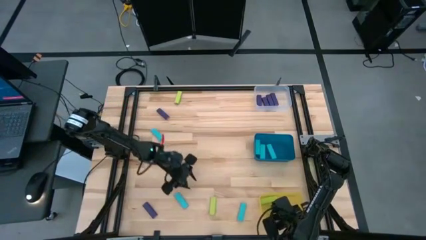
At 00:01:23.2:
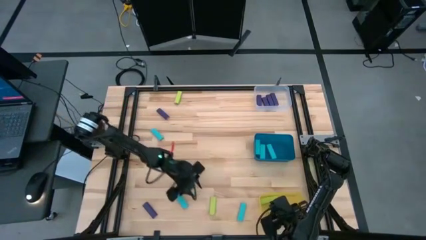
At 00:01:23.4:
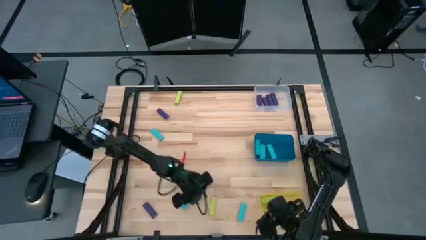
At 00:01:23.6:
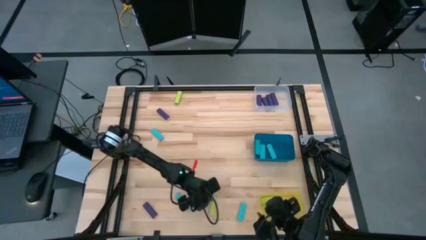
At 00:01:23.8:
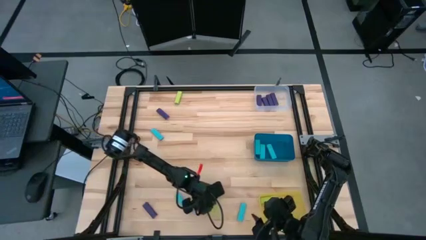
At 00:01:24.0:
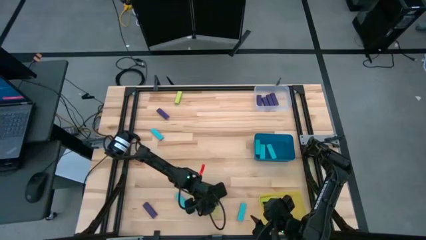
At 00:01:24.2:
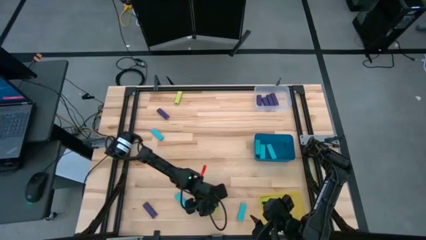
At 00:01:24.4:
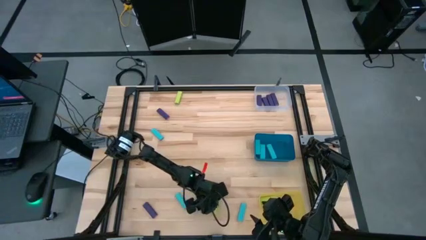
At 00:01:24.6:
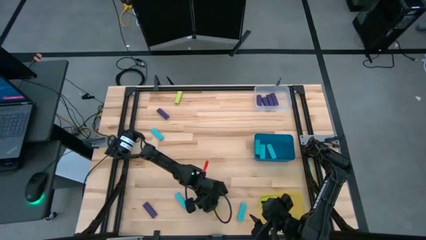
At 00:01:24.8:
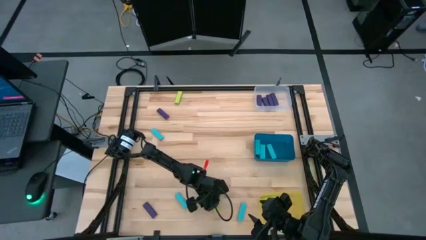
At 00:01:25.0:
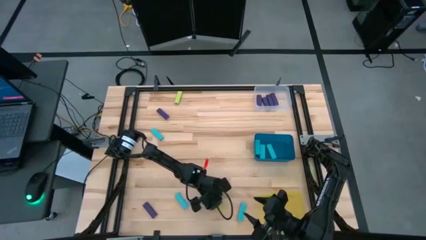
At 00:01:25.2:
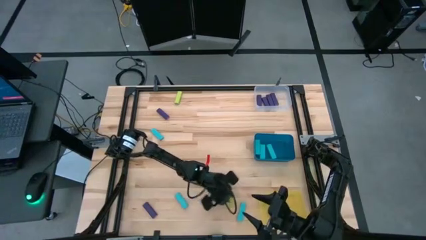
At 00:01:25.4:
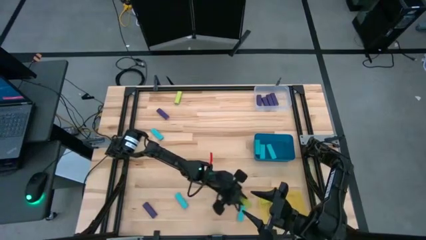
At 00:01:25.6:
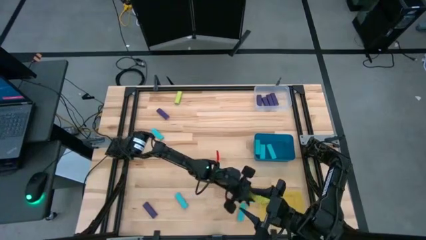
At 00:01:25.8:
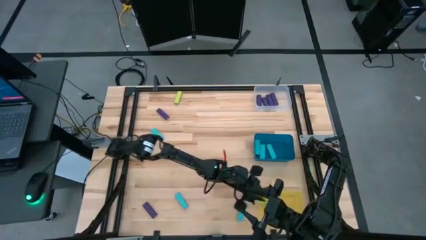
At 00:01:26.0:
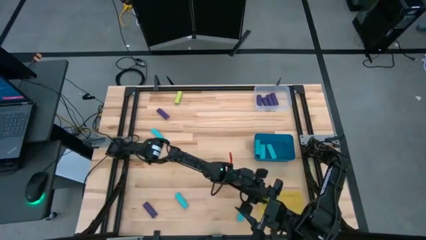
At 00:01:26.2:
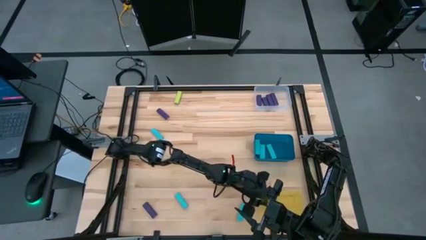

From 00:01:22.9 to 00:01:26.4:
Task: Sort blocks
Put the light green block into the yellow bin

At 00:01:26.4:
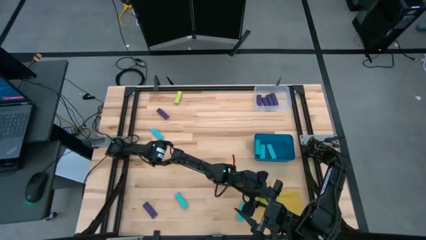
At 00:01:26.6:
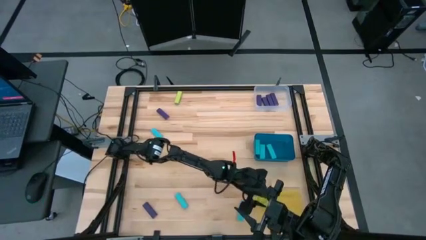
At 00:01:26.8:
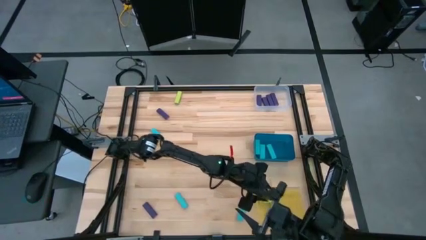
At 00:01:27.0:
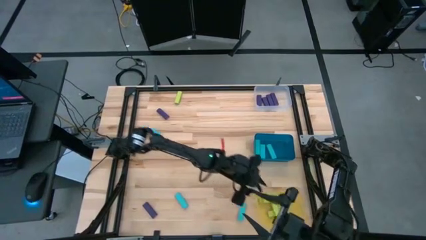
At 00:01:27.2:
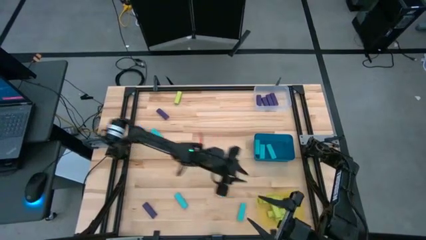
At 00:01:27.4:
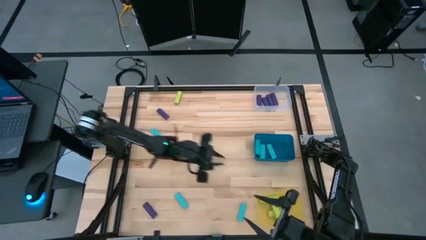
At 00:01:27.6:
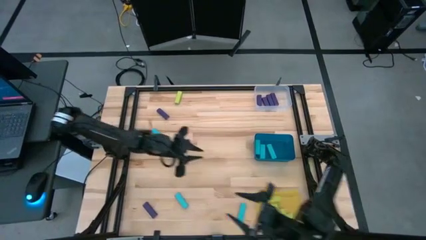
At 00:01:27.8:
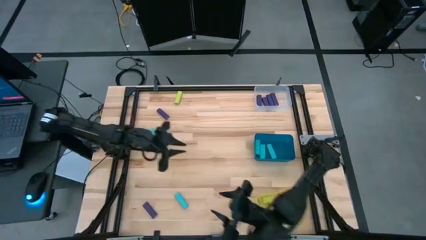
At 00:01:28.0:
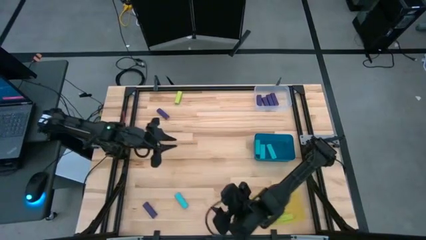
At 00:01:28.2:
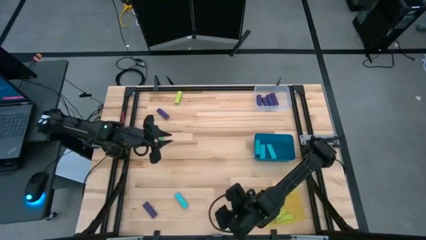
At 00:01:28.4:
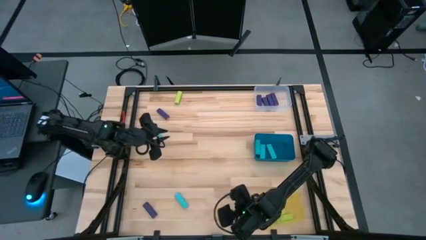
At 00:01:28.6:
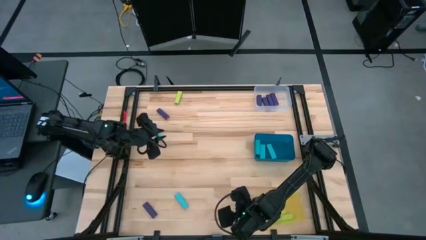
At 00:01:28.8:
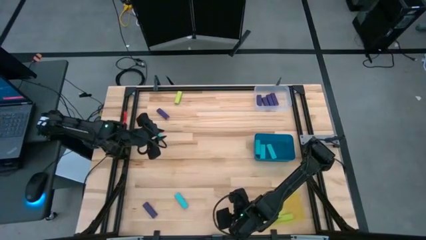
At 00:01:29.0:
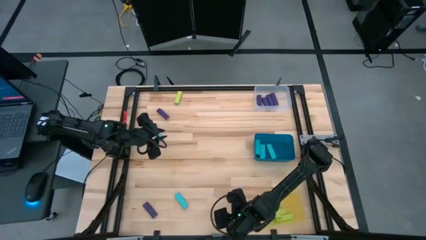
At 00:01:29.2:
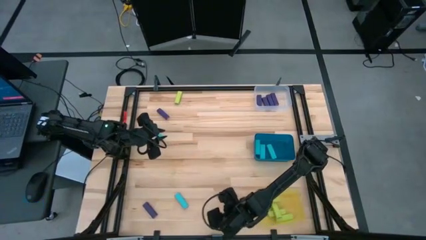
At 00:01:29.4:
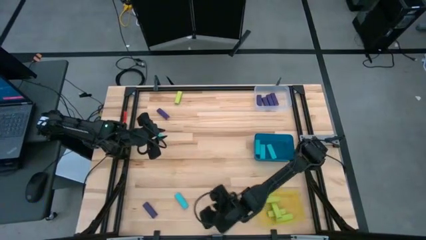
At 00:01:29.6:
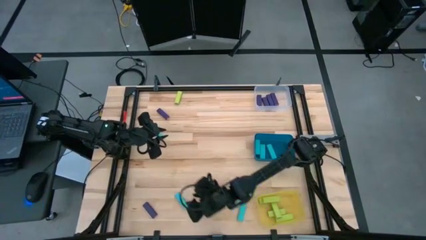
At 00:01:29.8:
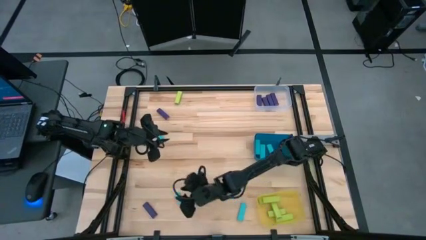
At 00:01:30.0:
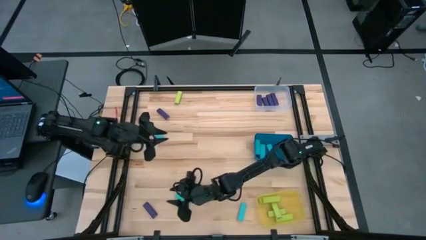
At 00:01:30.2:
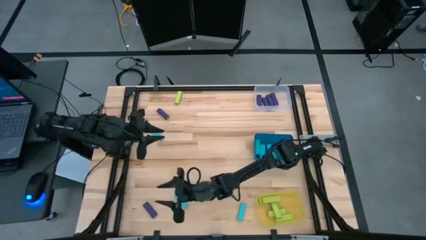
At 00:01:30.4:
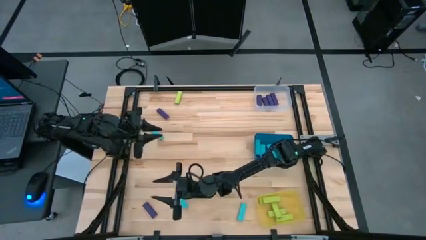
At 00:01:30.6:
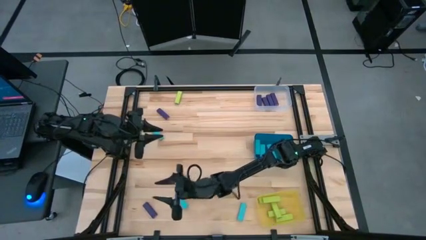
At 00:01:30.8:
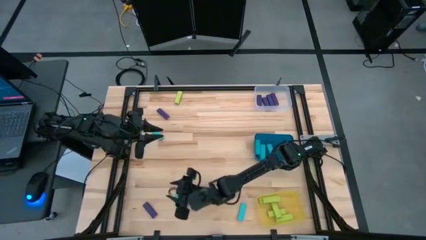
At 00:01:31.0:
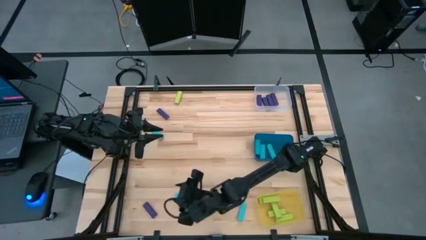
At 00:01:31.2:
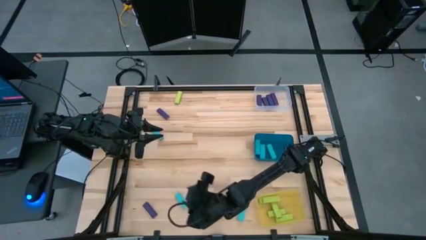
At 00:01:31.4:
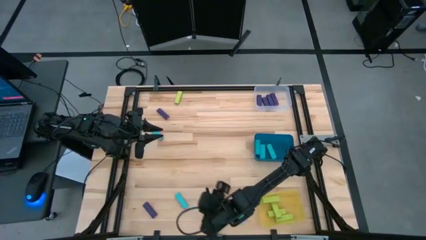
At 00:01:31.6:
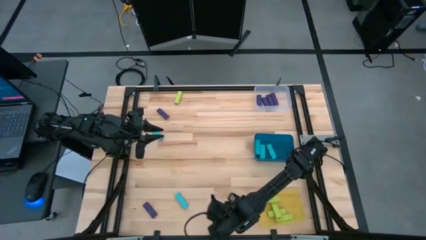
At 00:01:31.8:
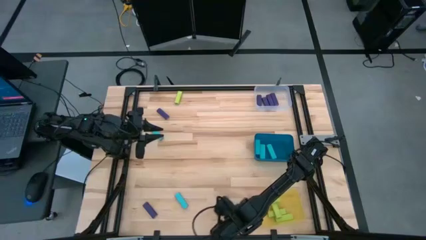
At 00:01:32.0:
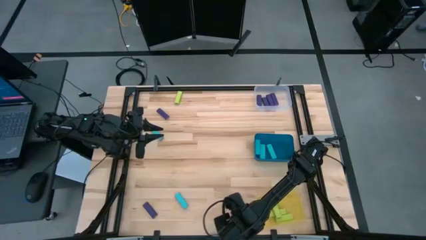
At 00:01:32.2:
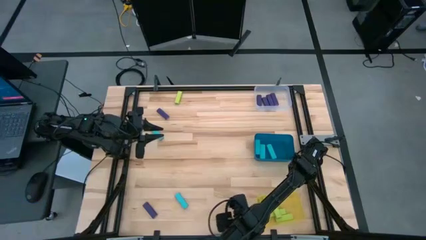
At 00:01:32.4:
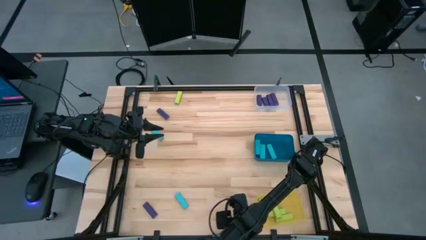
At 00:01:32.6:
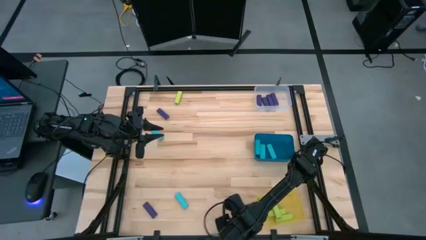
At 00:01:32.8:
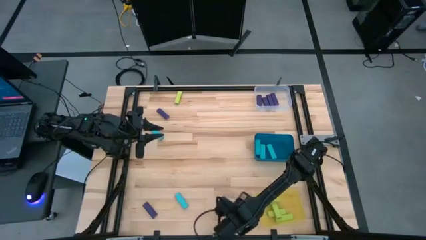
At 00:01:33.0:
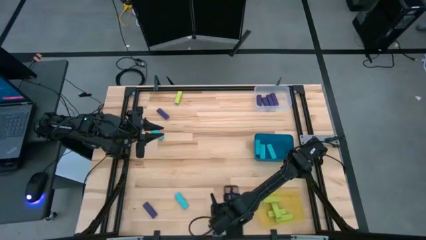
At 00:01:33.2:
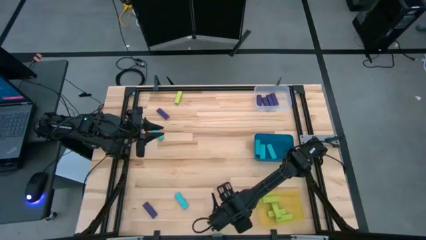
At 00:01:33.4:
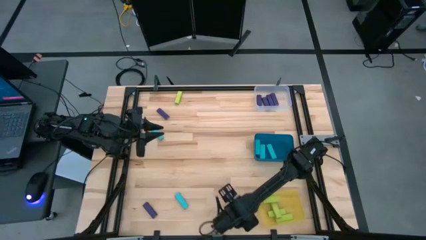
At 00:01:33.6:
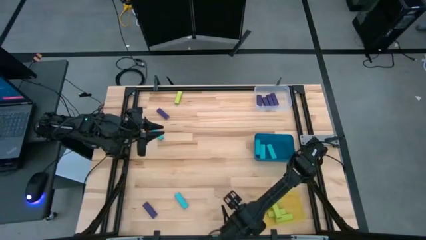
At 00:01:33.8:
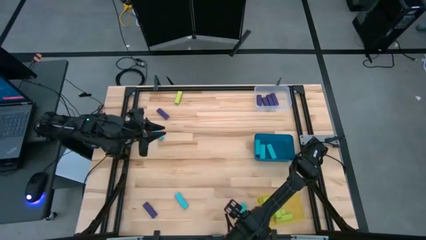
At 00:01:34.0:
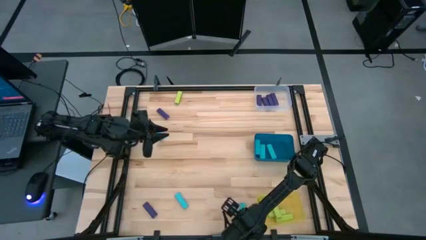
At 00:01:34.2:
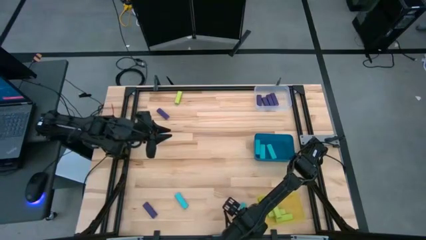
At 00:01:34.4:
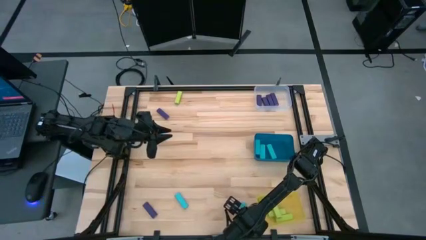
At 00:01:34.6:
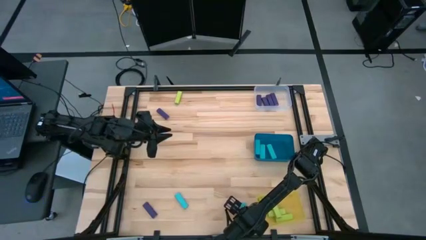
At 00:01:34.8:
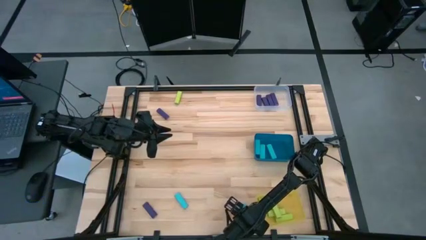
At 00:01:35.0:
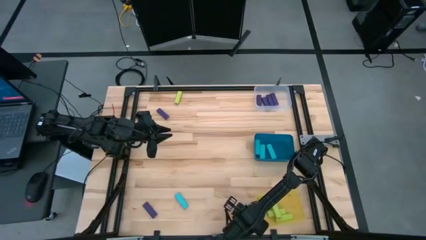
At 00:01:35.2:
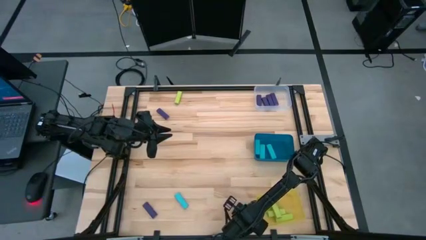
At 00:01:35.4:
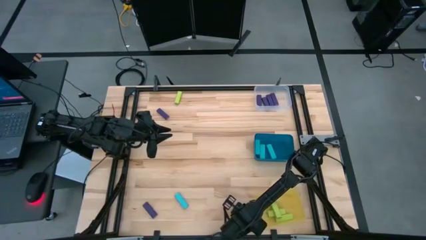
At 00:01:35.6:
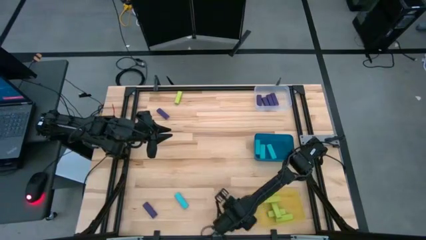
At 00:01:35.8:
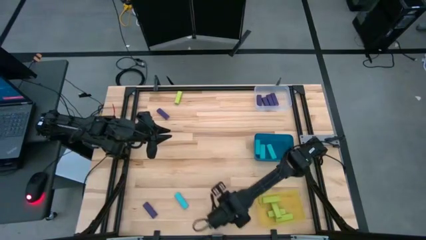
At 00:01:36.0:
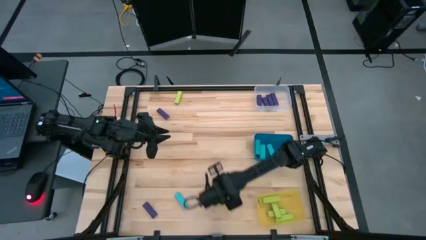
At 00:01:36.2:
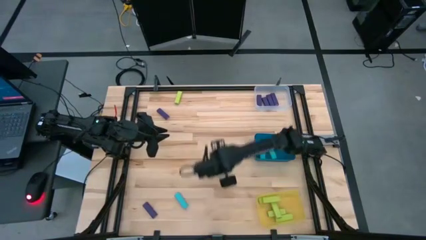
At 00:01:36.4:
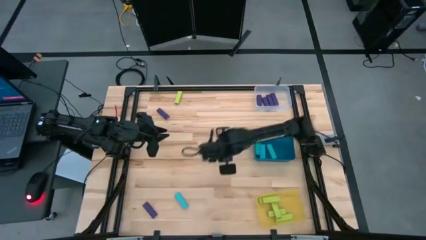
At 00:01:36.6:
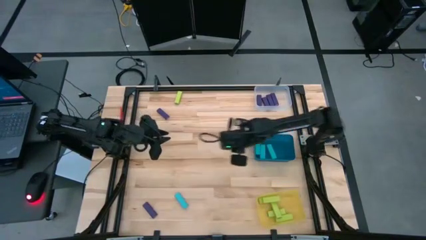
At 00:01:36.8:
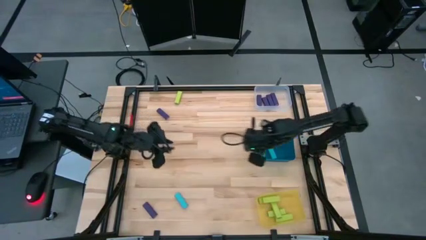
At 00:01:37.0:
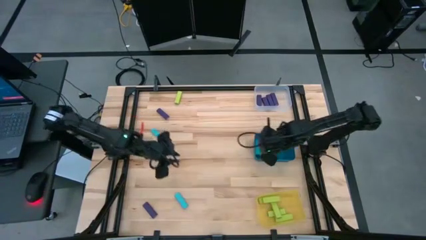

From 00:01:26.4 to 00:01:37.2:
Put the light blue block into the blue bin

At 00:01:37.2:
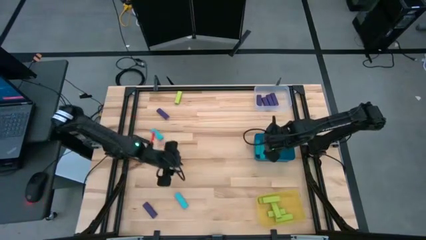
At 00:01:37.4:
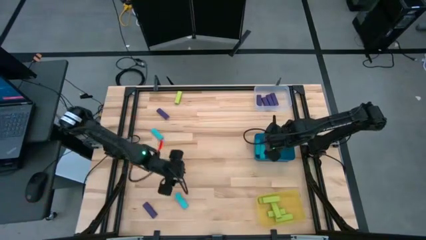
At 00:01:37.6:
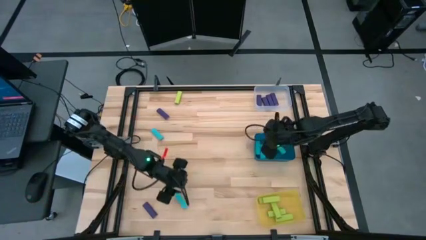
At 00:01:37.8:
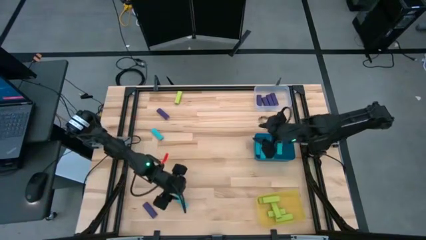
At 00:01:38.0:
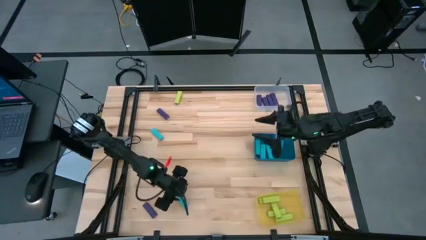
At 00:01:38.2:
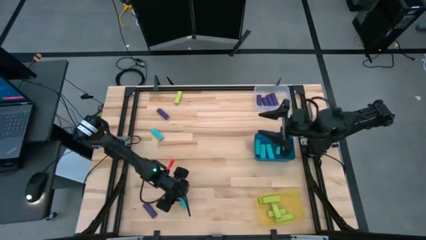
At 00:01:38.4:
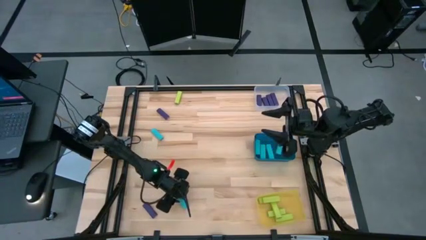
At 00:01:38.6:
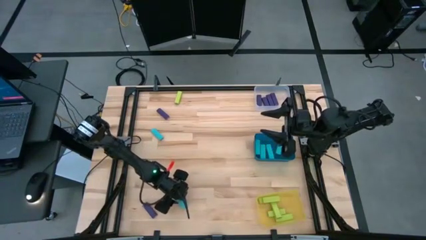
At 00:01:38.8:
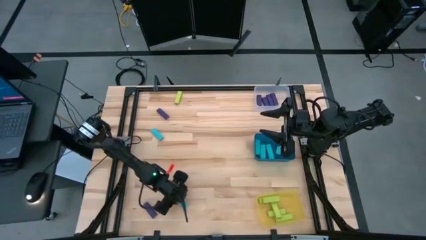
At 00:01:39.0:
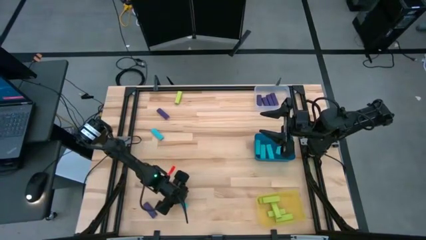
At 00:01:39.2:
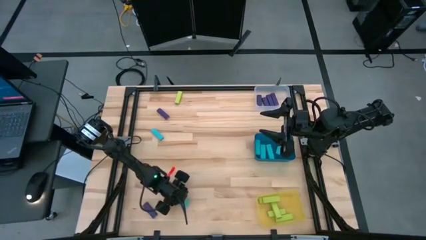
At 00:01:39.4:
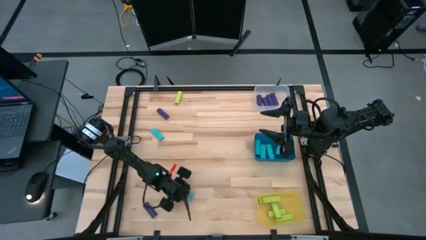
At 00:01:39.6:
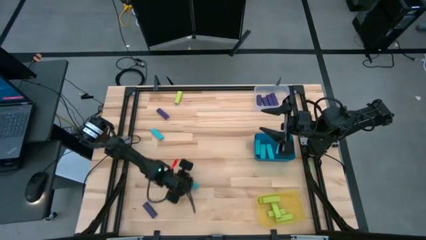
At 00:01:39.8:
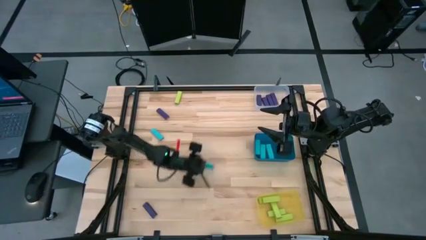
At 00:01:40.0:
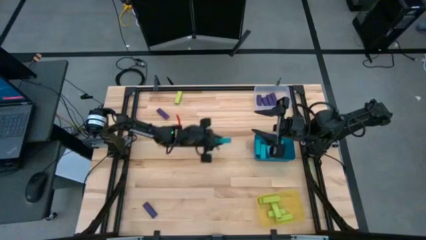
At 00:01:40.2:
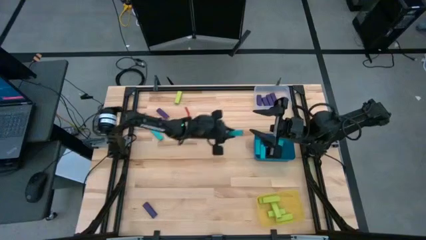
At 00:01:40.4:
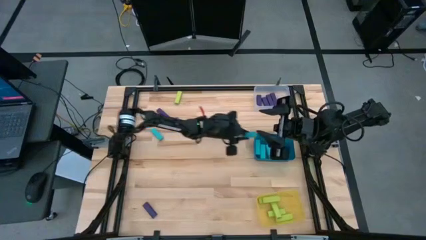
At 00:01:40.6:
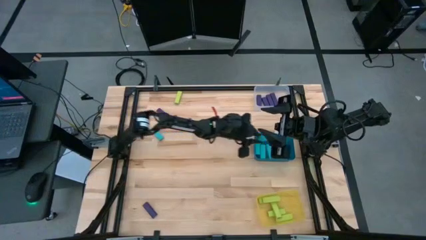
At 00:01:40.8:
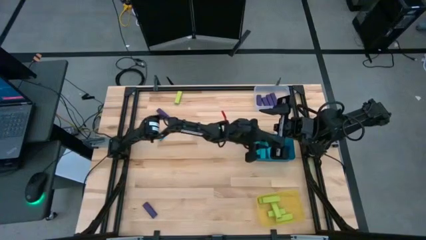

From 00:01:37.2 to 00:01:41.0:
Put the light blue block into the blue bin
